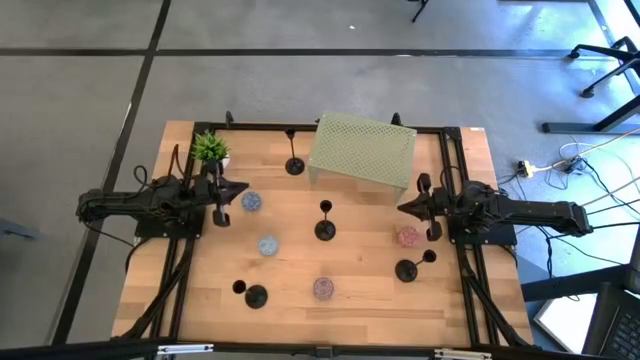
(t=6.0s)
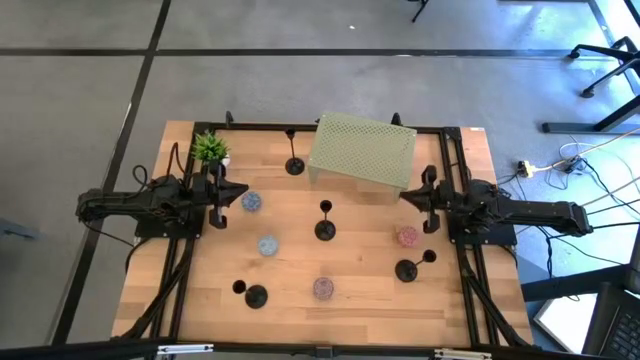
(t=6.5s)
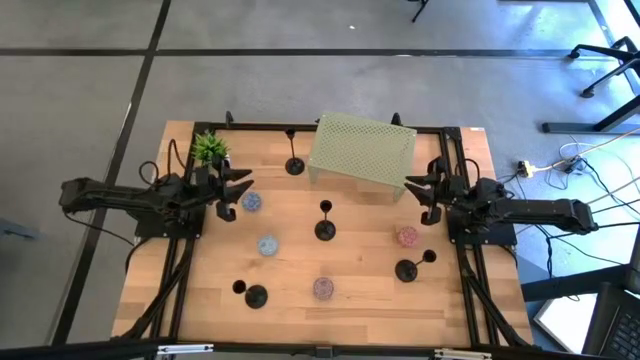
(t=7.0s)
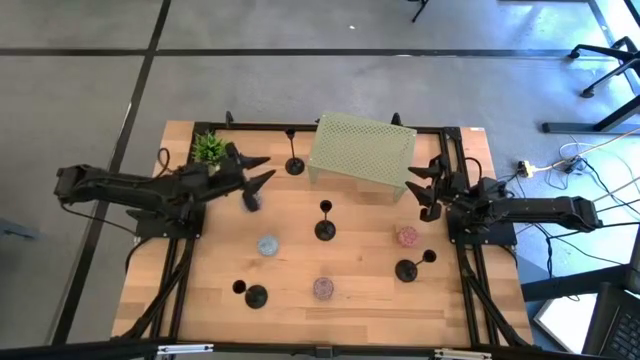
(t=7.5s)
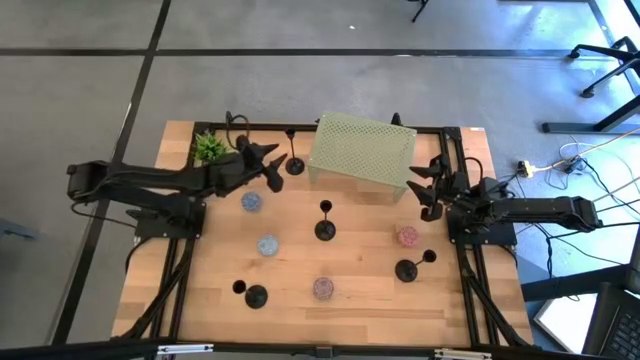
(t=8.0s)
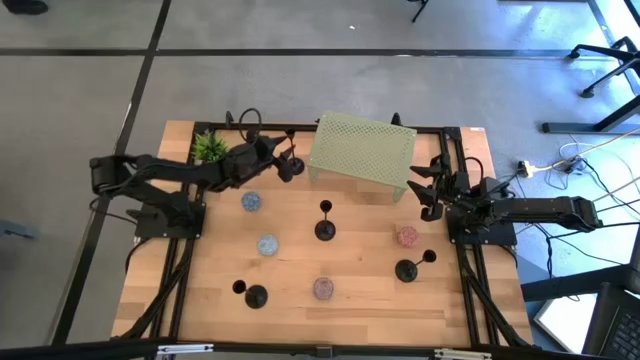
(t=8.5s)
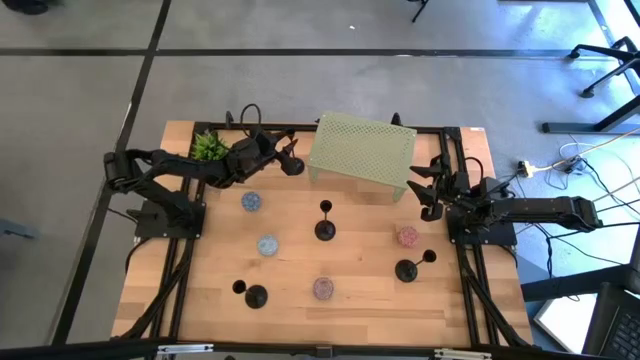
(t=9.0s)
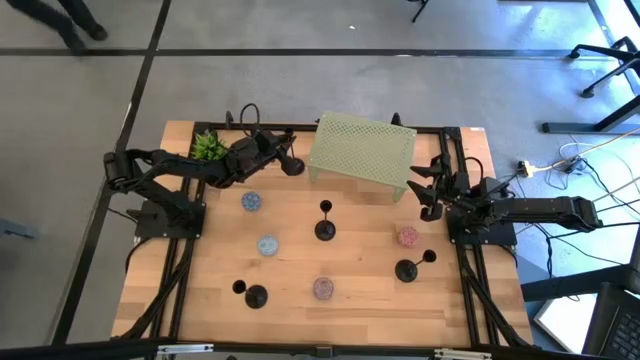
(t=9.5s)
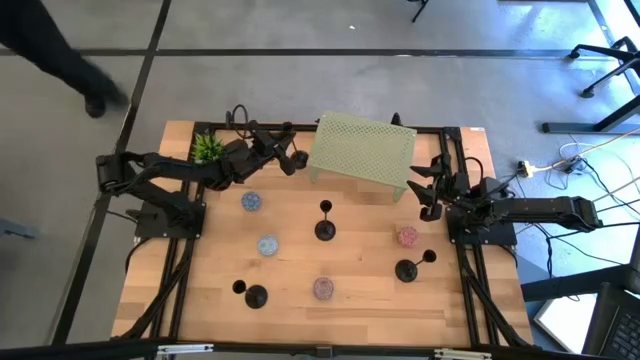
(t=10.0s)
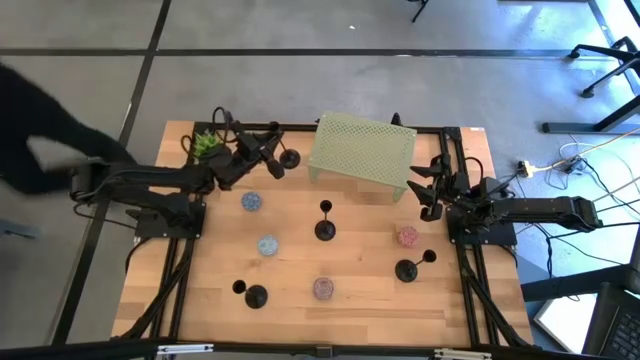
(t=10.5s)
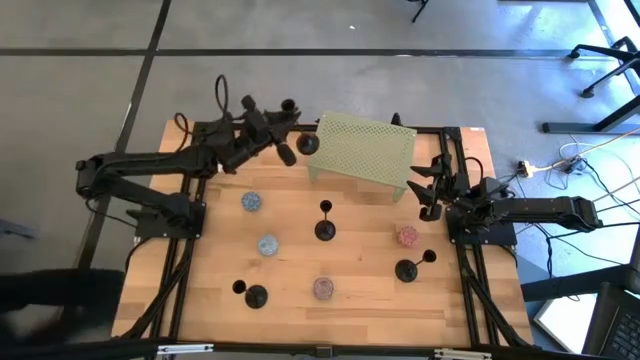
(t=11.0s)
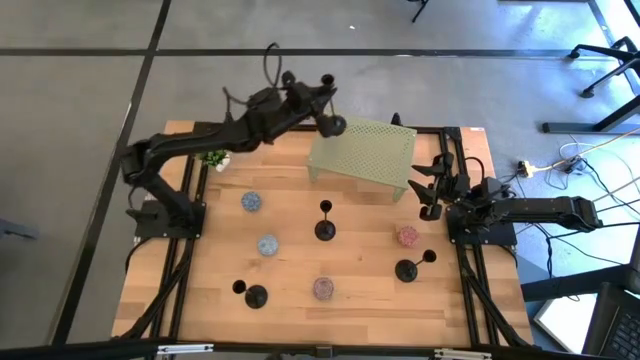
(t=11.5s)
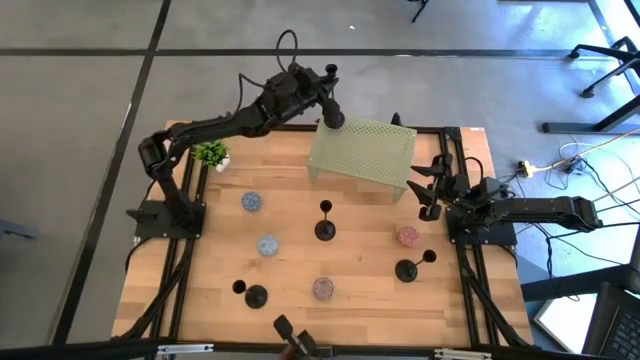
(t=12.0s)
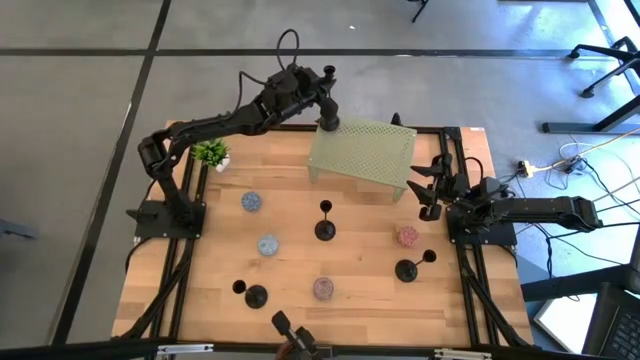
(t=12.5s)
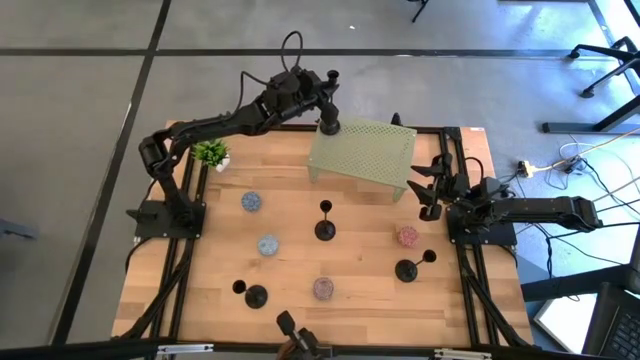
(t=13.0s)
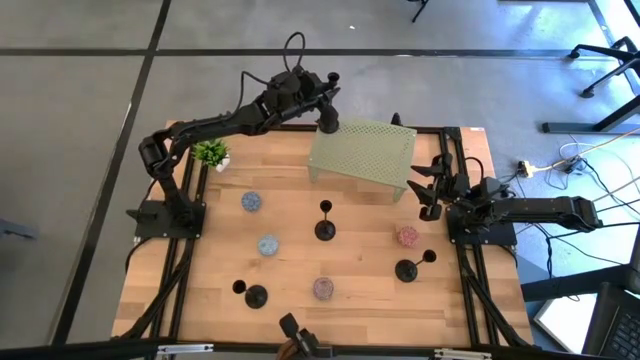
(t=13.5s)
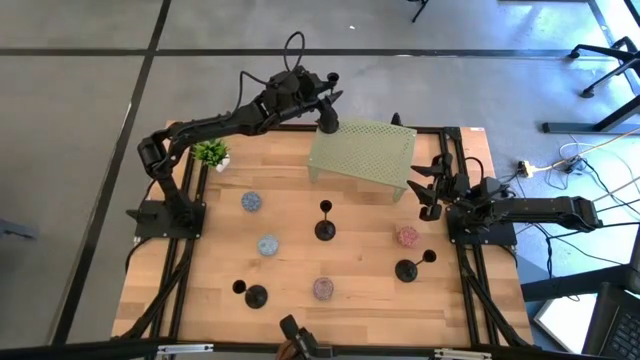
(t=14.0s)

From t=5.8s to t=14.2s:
Task: Pick & Place candle stick holders
Put the black candle holder on the shelf

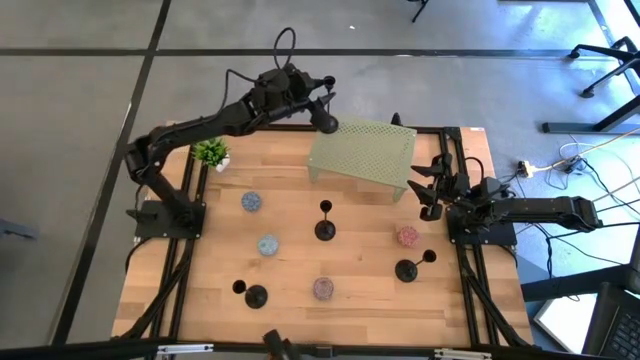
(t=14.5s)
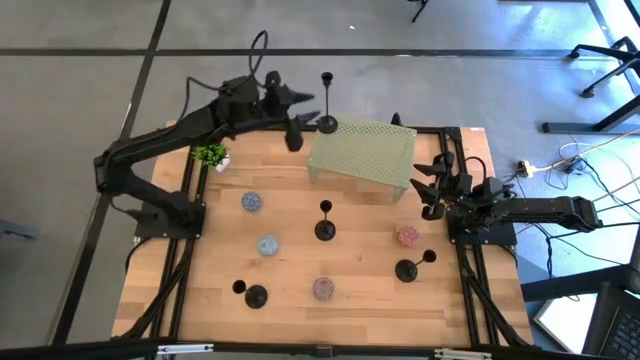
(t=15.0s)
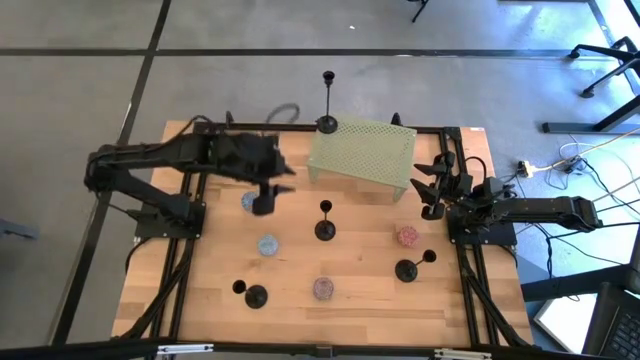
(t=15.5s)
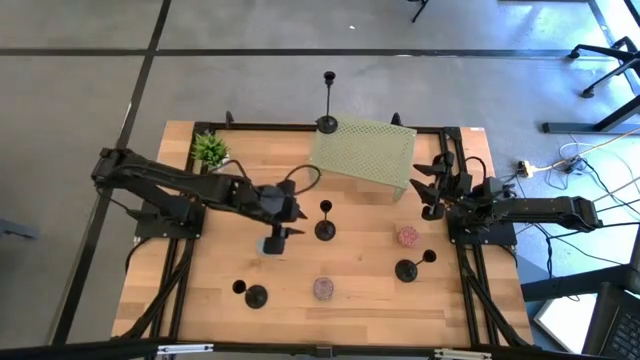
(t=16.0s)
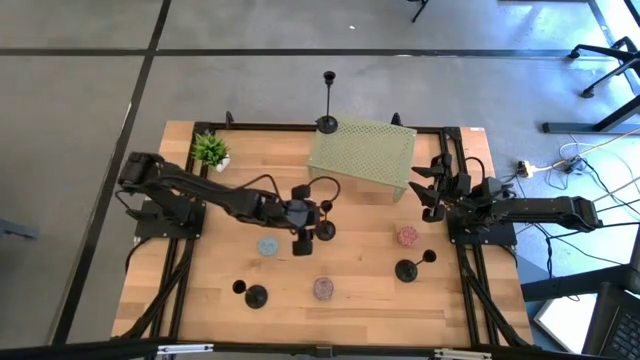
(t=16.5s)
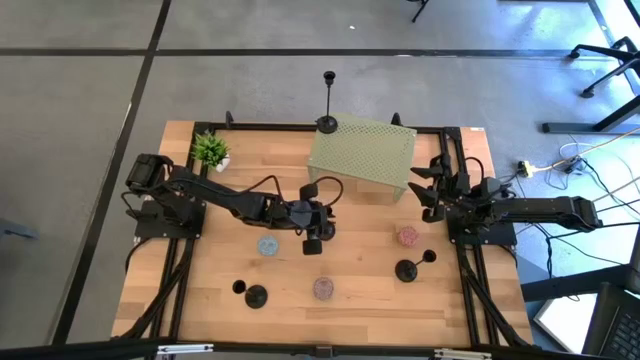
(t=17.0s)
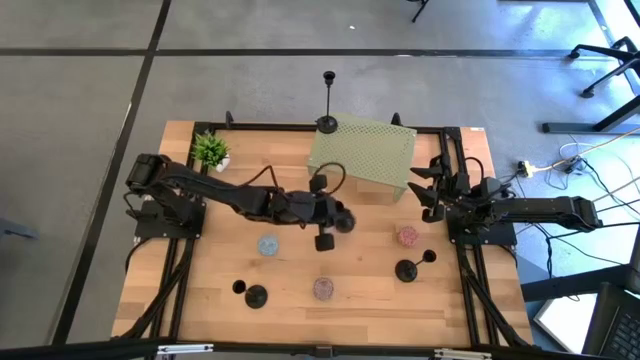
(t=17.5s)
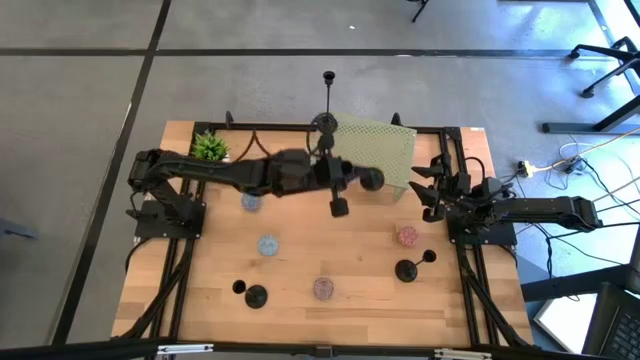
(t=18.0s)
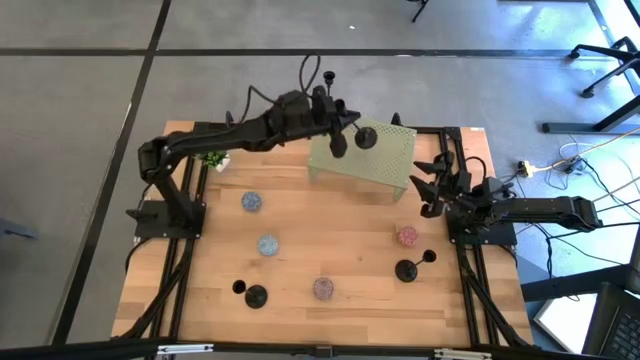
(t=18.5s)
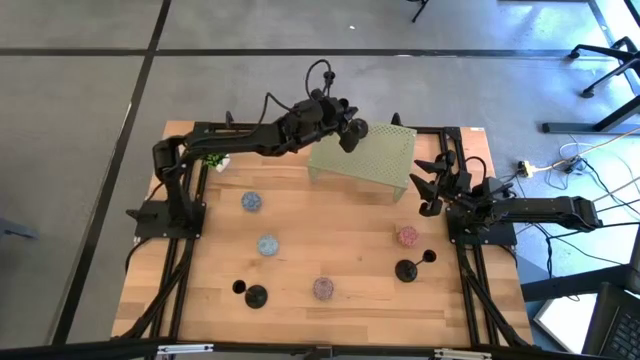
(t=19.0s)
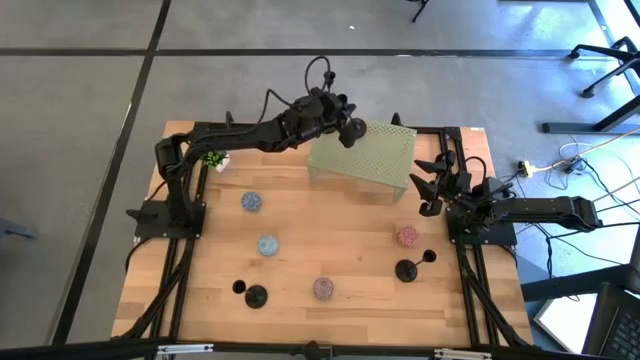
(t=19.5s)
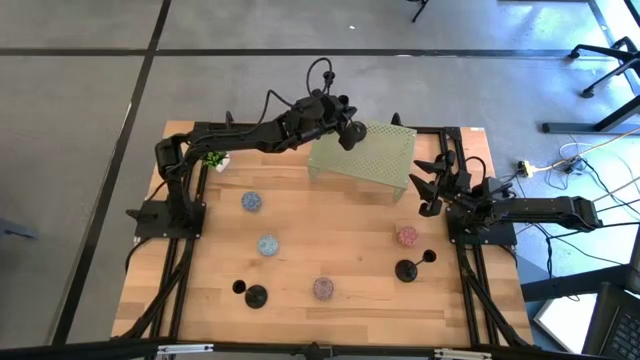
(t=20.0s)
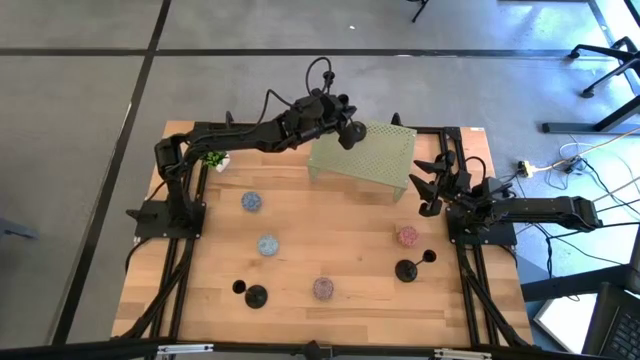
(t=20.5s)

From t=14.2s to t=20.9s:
Put the black candle holder on the shelf

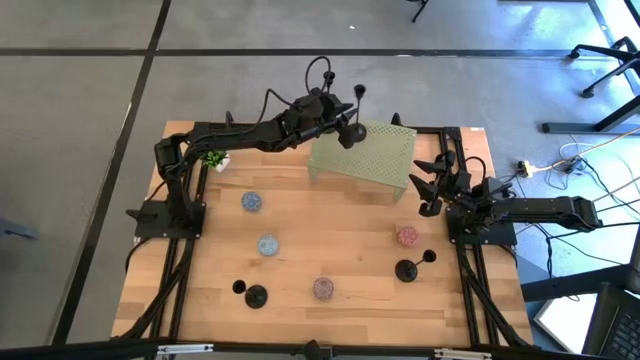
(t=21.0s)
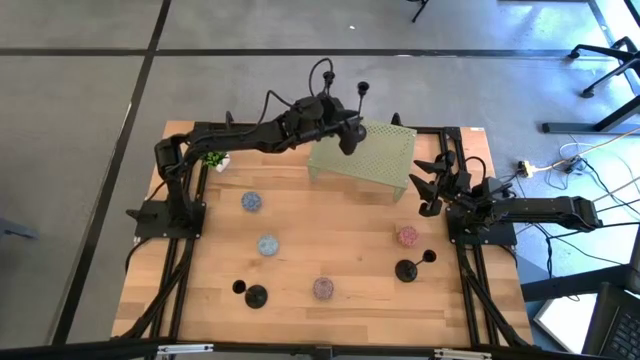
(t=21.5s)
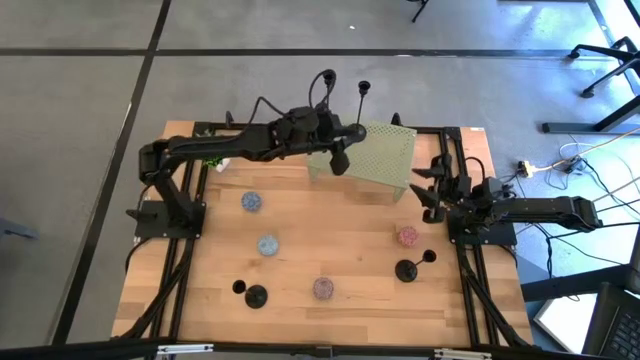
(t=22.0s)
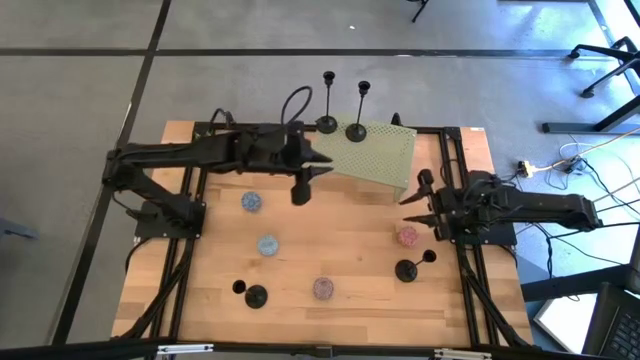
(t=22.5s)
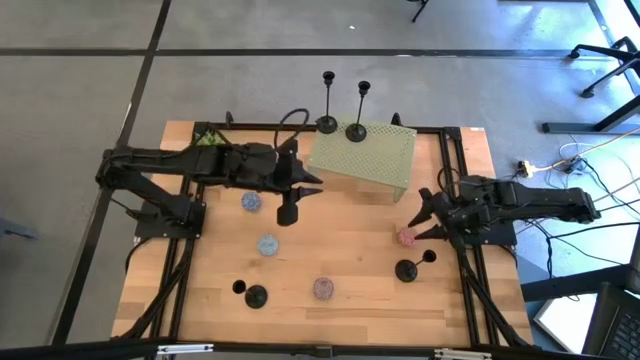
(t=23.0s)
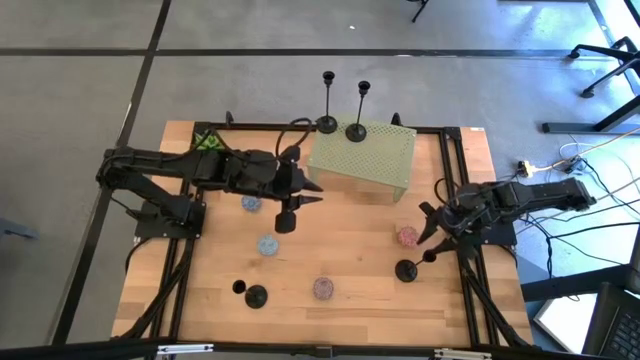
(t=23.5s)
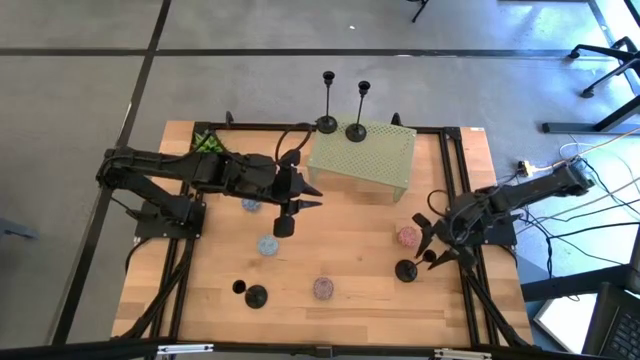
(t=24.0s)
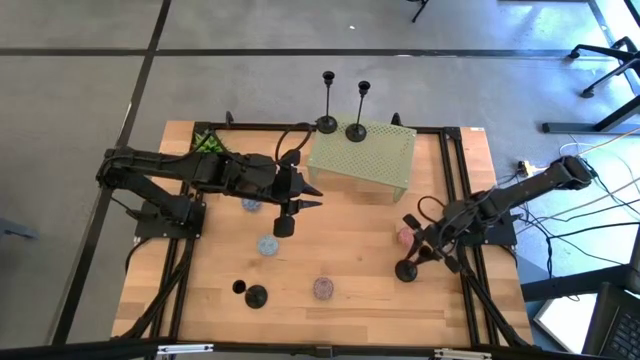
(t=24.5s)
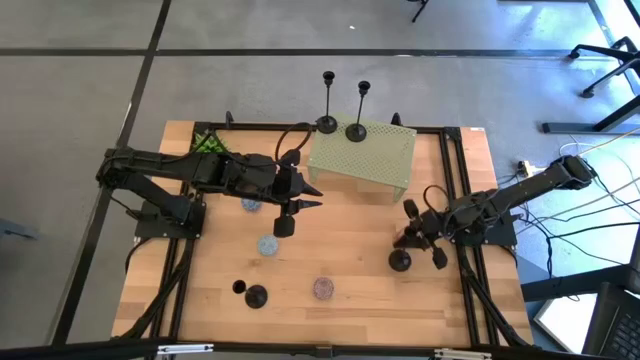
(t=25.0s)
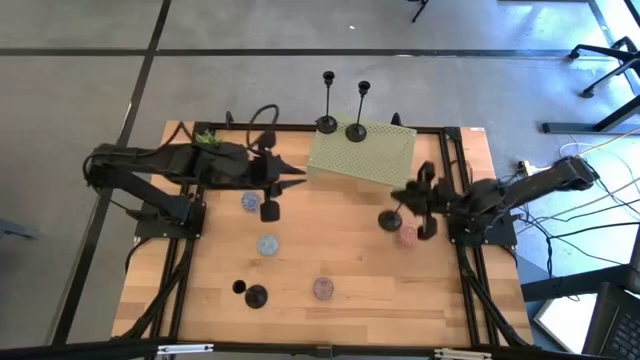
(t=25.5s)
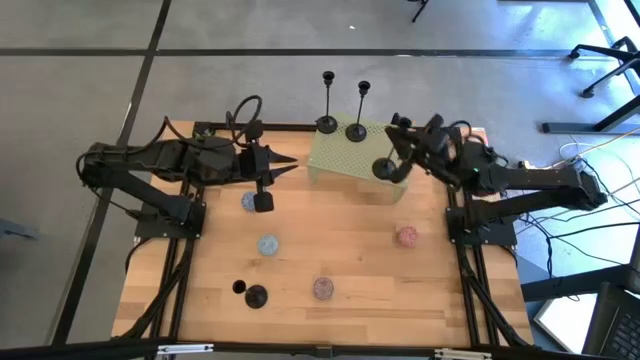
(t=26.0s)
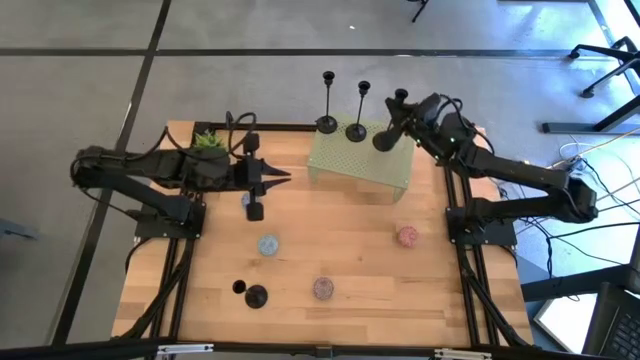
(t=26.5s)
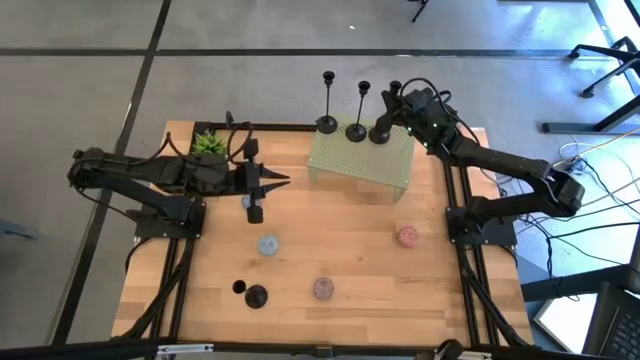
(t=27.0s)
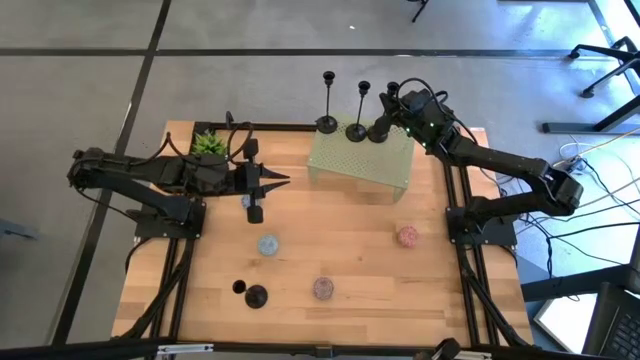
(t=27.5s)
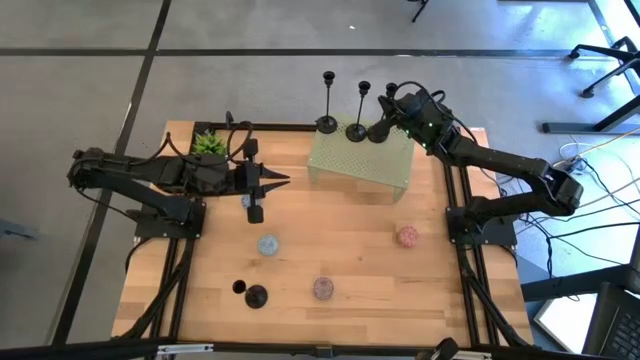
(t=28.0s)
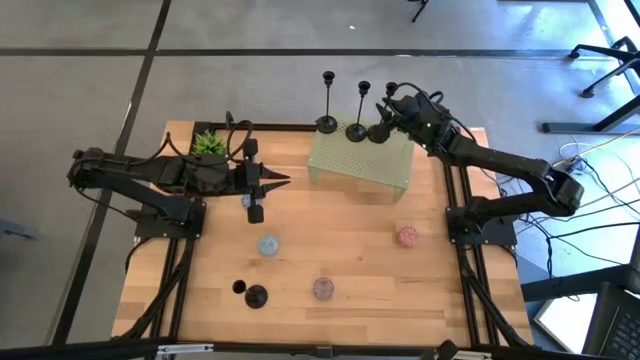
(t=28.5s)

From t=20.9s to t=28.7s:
Put the black candle holder on the shelf
